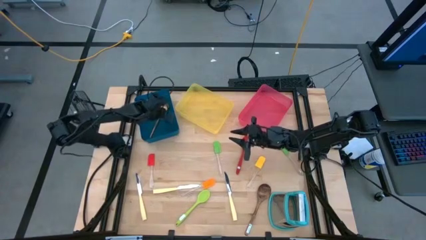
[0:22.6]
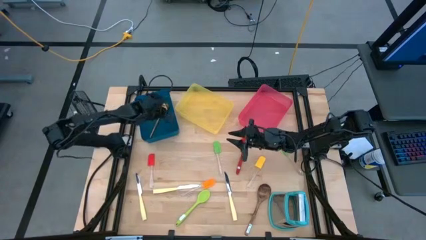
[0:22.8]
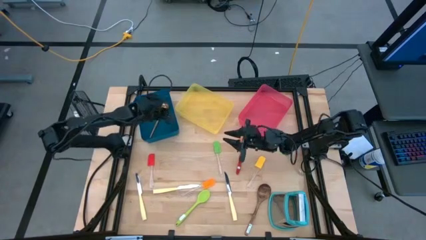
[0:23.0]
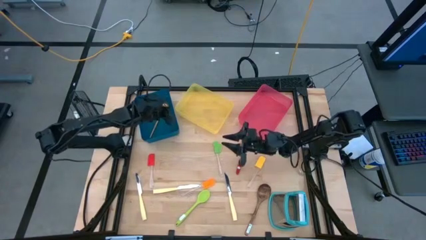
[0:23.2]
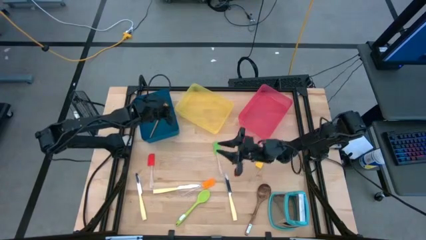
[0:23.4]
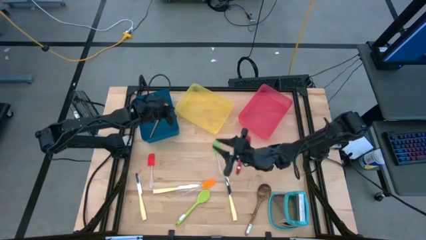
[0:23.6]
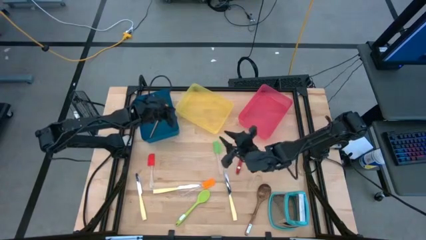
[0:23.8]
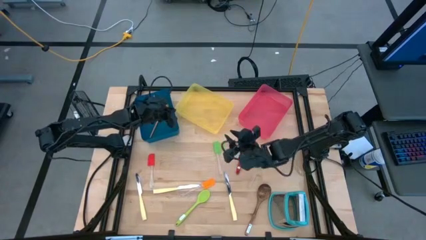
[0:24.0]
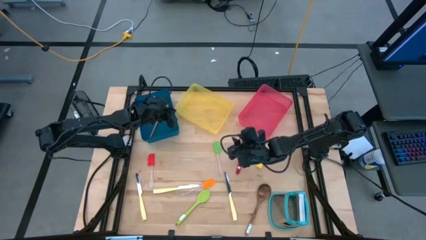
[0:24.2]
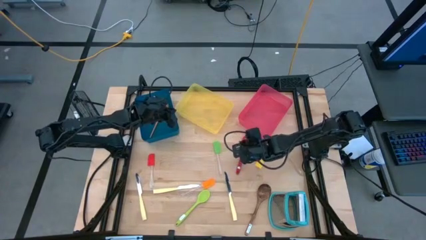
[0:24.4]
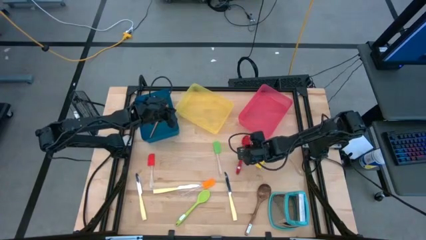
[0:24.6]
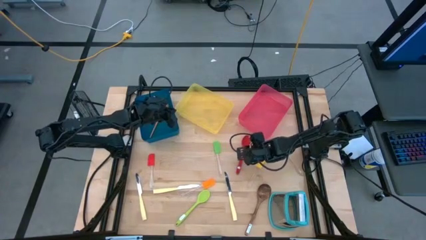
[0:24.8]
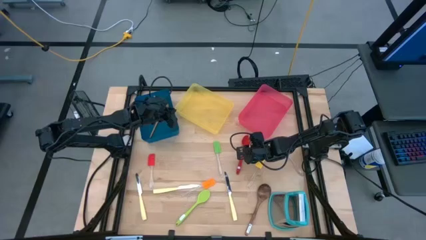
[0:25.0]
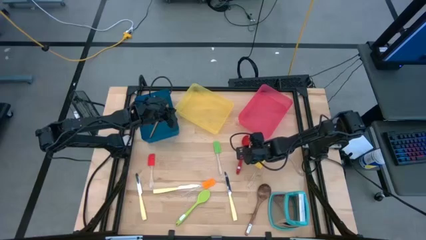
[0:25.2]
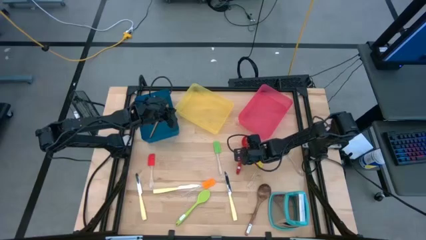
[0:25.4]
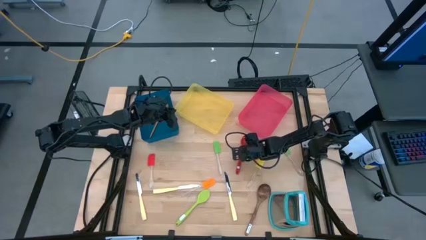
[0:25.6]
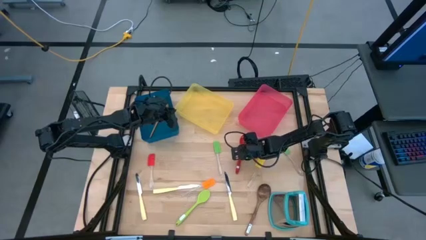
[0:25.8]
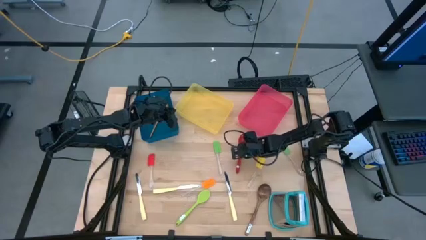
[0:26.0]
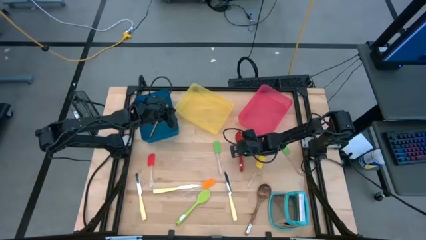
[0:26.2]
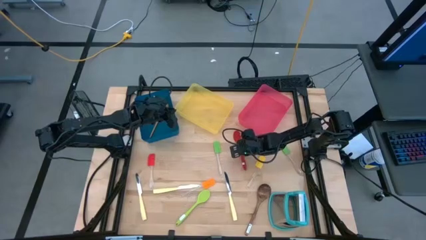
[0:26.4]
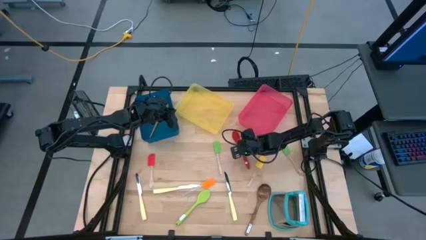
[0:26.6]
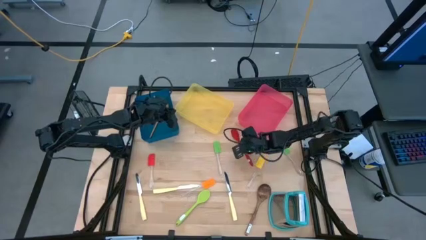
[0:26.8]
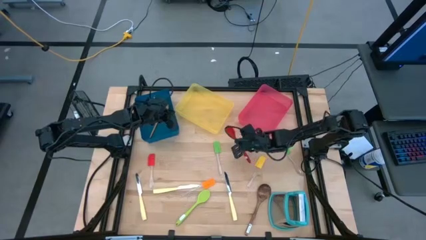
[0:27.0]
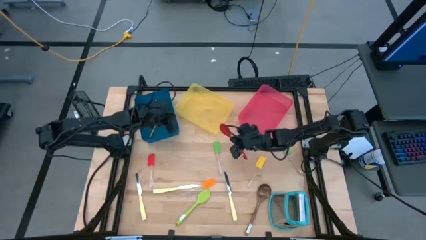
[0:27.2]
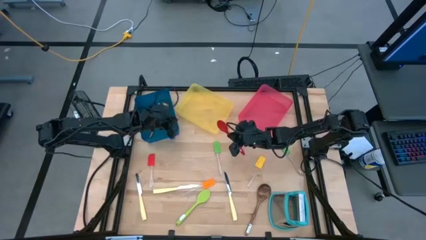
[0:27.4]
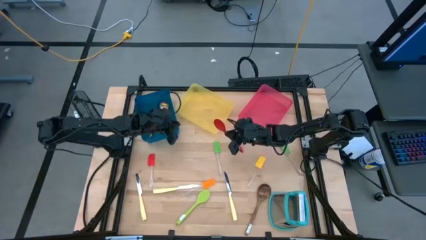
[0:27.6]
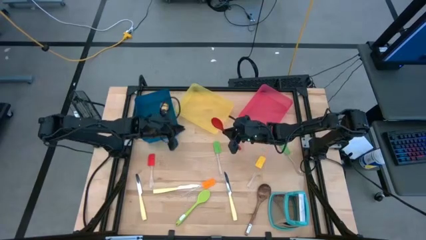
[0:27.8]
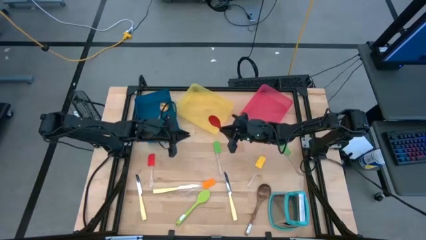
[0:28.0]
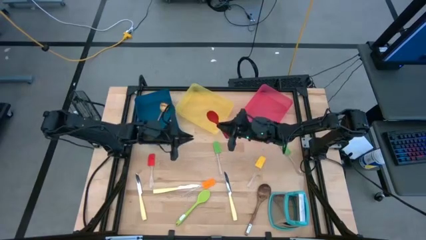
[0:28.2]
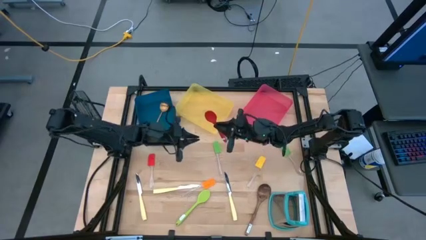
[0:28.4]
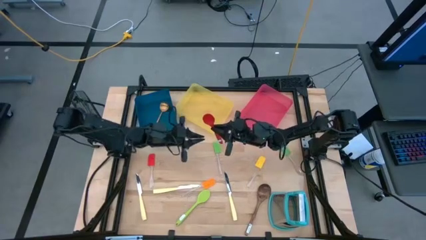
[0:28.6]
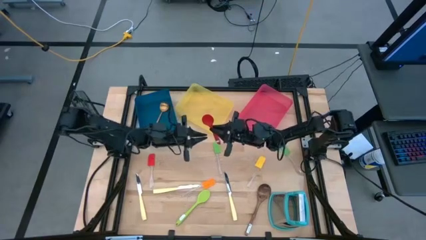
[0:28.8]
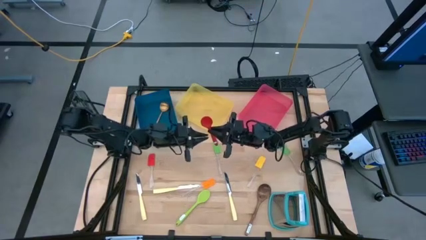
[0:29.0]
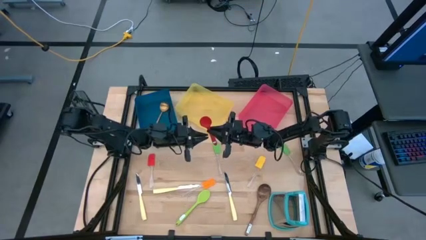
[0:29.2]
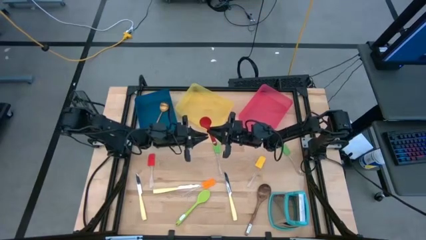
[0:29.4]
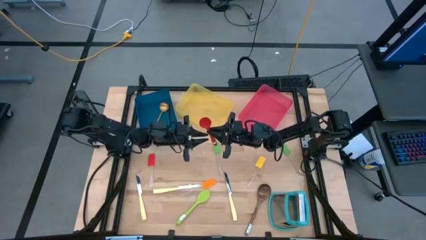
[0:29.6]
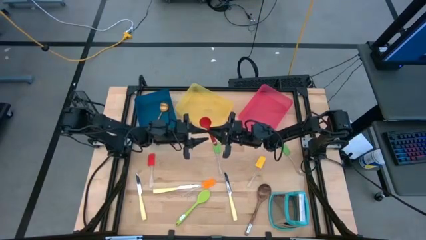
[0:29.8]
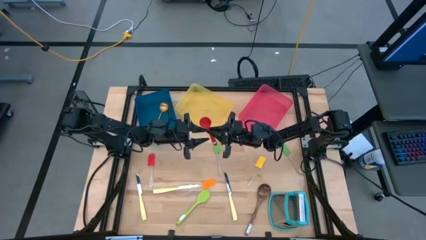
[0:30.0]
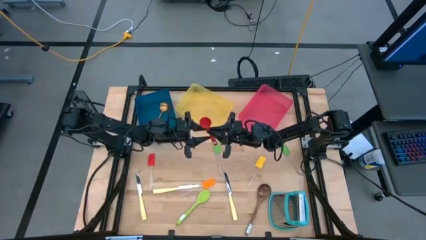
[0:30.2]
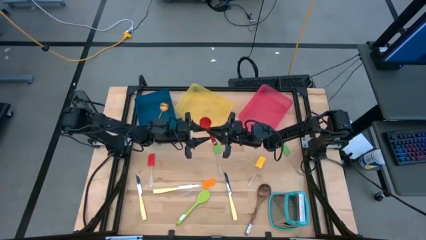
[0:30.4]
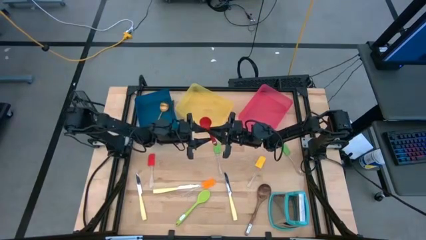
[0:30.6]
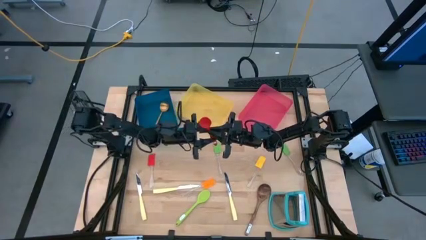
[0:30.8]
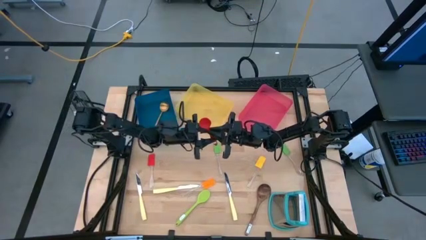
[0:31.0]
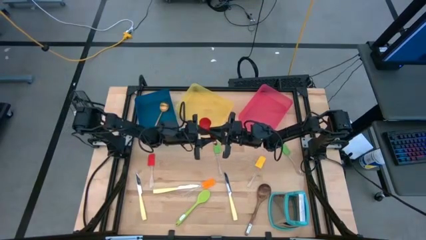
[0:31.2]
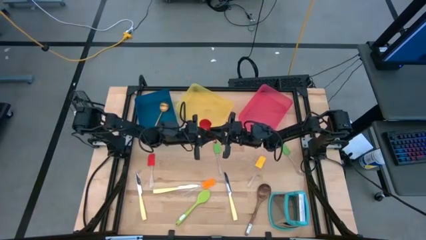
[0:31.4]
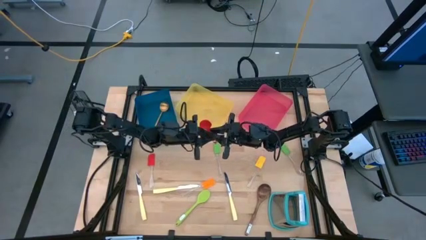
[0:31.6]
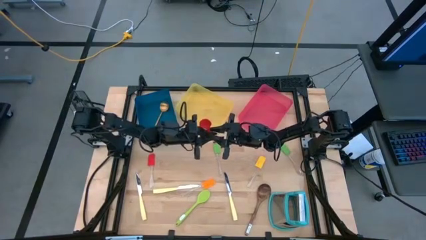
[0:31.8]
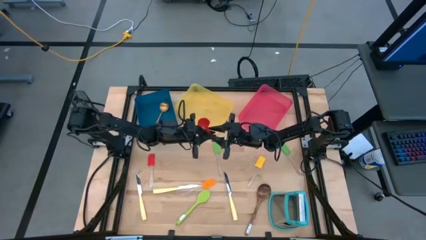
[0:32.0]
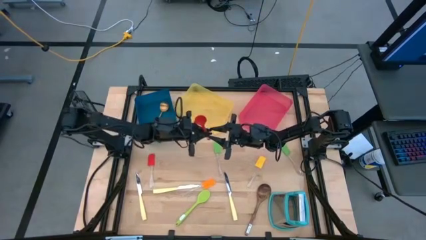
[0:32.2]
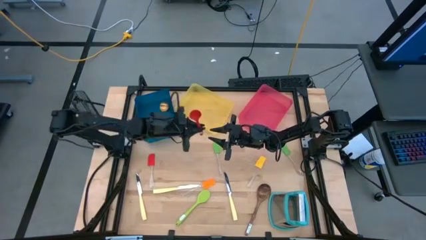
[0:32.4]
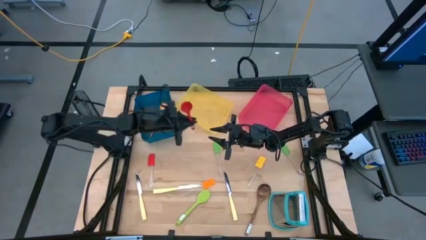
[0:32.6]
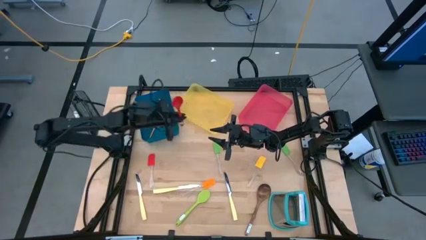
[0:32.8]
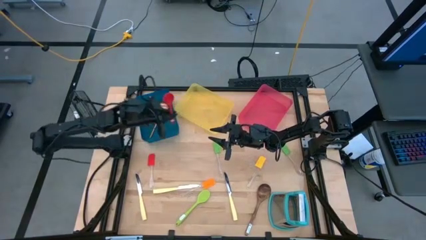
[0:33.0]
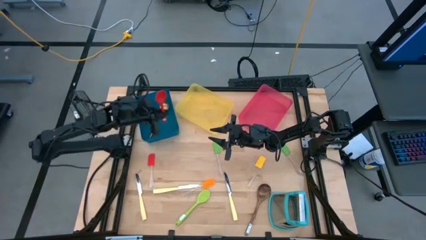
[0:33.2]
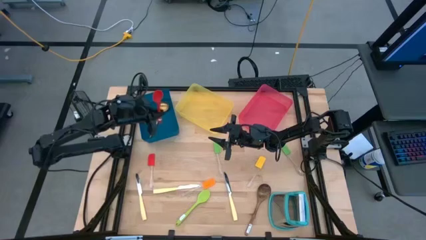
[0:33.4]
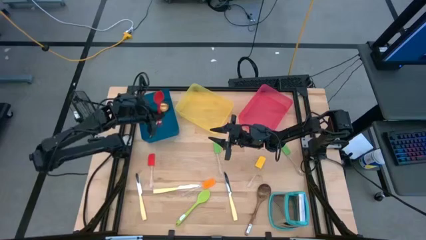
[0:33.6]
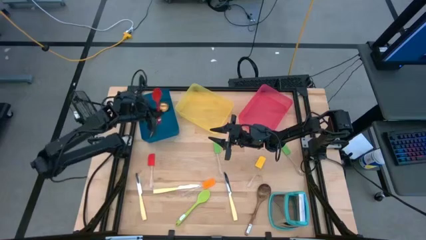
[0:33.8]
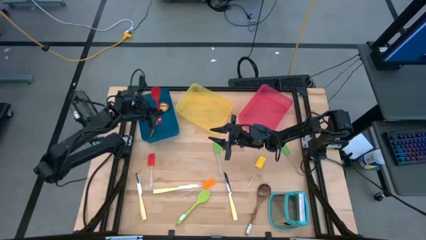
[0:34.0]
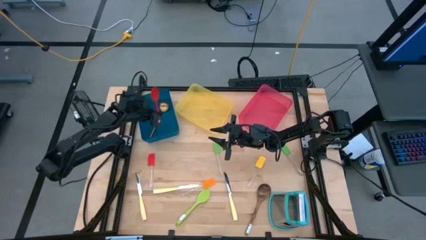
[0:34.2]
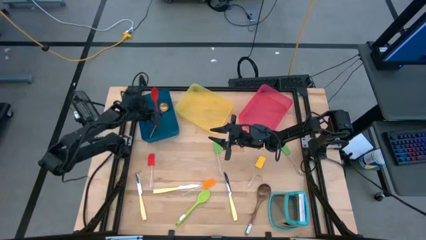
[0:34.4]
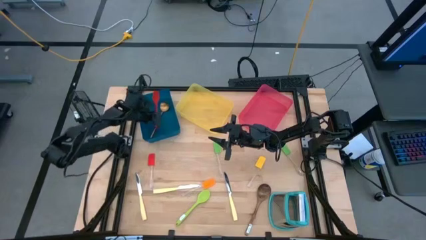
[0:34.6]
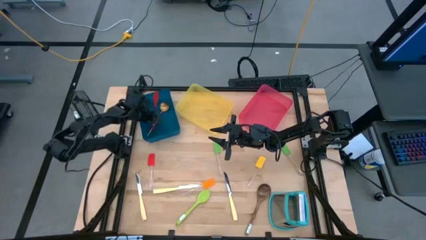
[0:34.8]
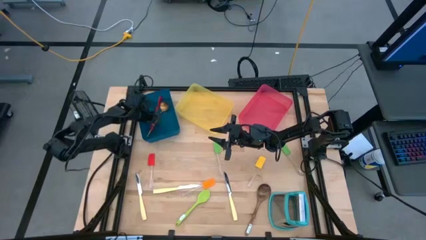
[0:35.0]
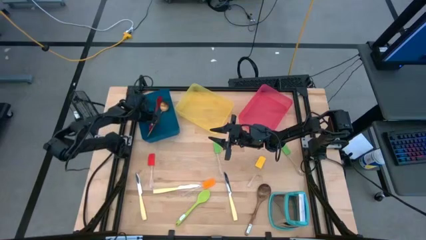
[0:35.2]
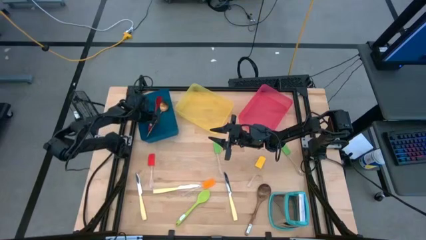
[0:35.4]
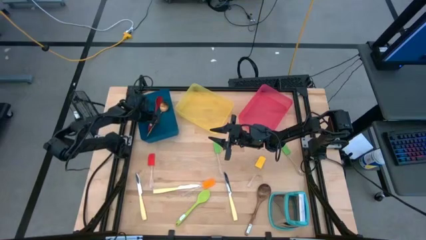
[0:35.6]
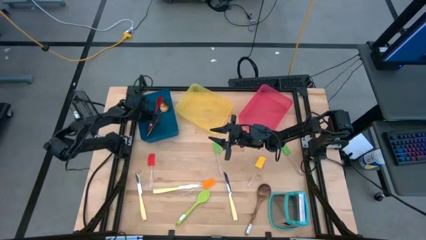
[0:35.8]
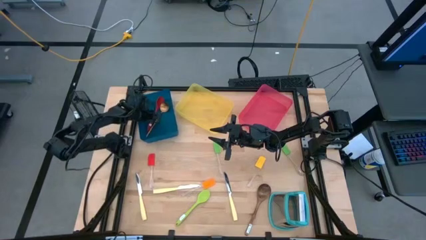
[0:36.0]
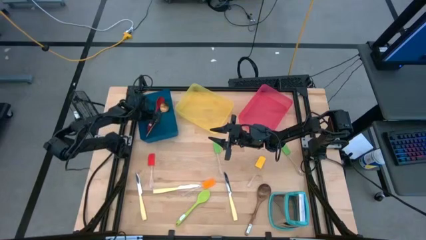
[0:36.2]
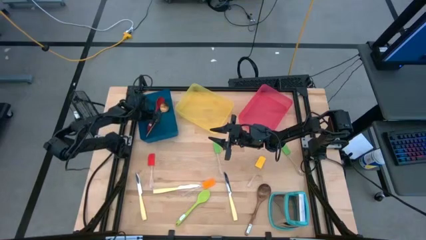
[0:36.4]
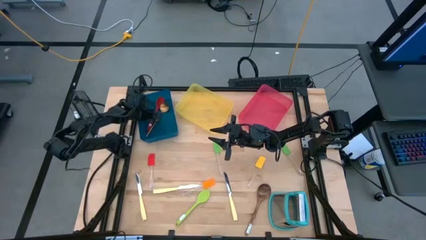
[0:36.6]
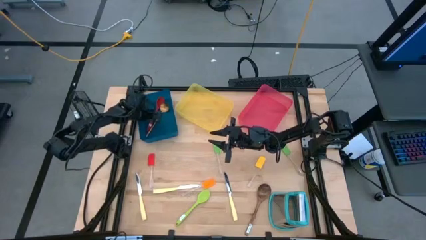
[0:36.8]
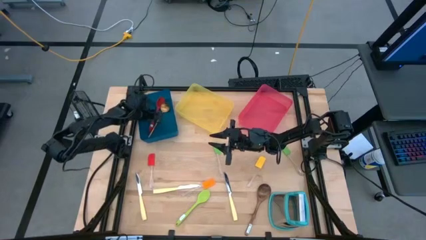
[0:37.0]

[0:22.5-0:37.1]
Task: Pick & Place Kitchen Items
Put the red serving spoon into the blue bin
